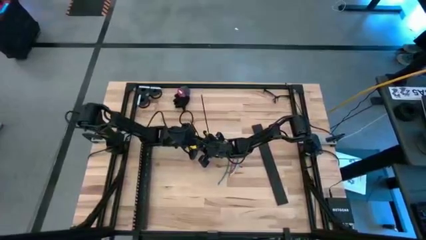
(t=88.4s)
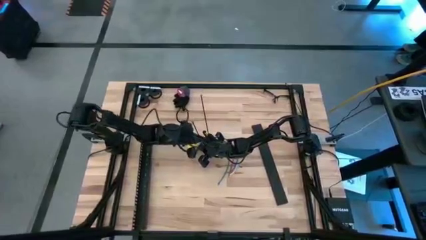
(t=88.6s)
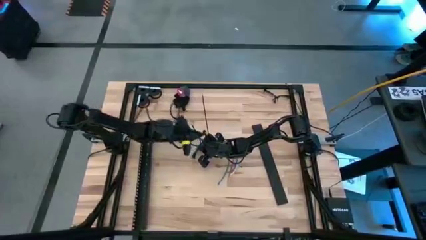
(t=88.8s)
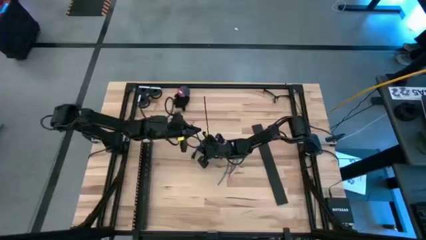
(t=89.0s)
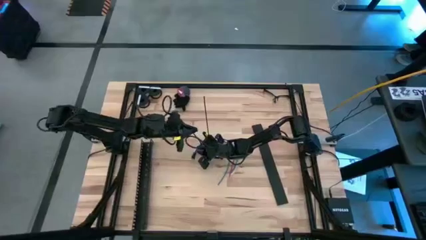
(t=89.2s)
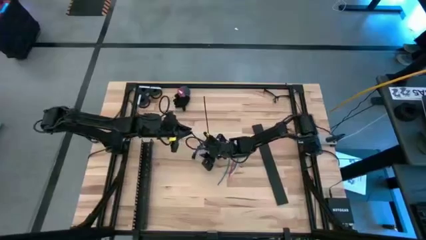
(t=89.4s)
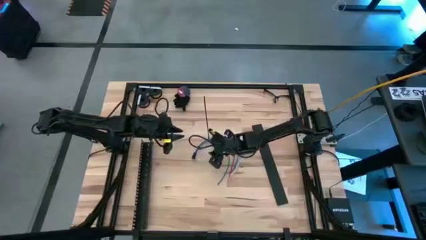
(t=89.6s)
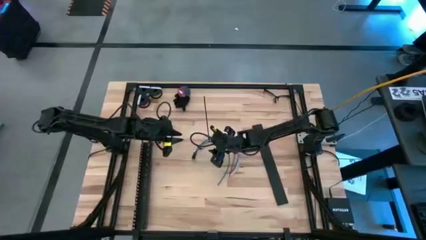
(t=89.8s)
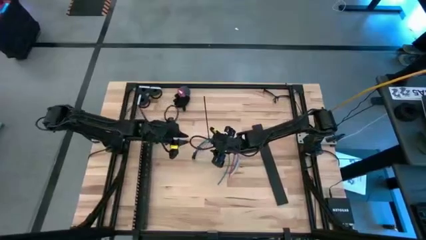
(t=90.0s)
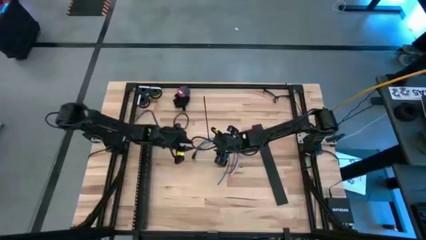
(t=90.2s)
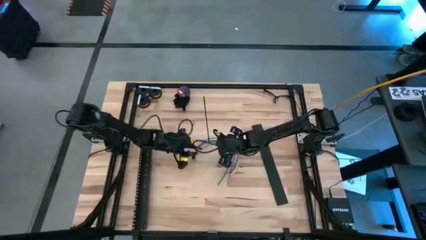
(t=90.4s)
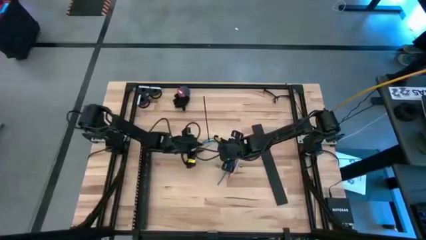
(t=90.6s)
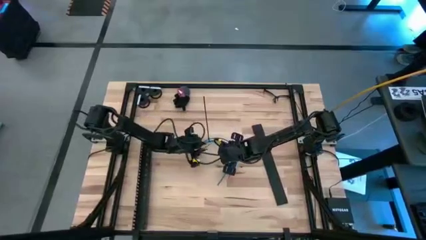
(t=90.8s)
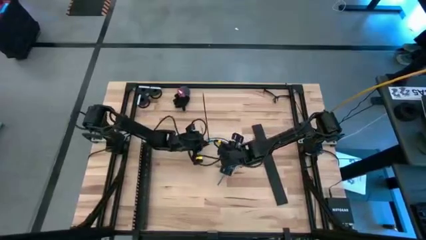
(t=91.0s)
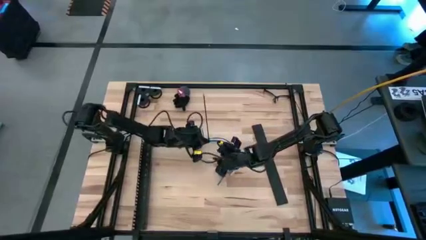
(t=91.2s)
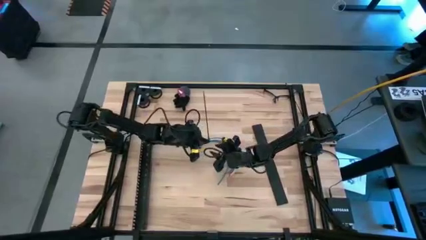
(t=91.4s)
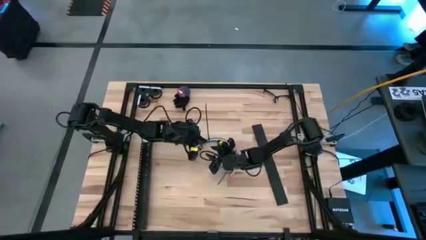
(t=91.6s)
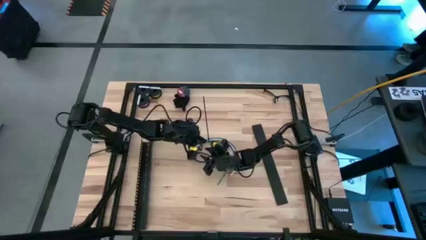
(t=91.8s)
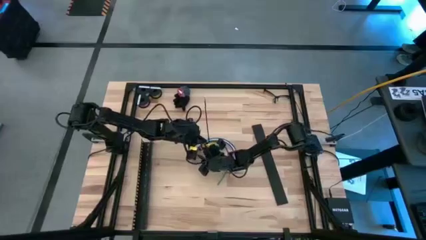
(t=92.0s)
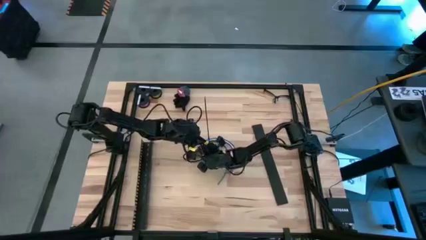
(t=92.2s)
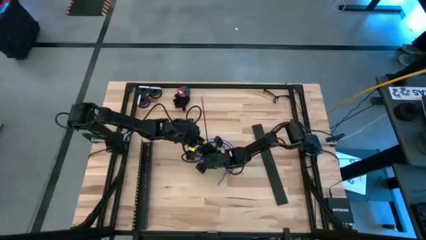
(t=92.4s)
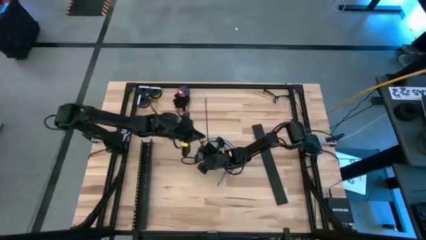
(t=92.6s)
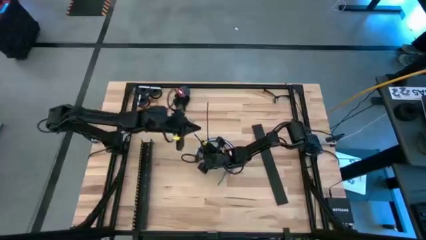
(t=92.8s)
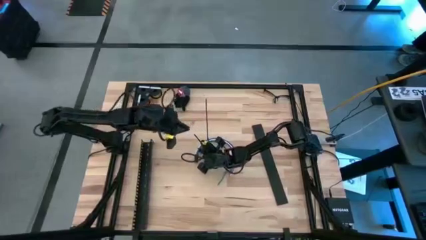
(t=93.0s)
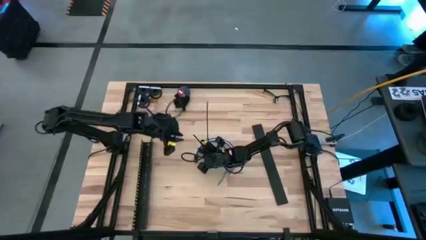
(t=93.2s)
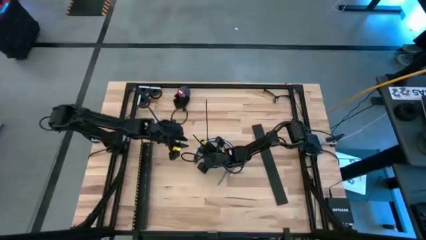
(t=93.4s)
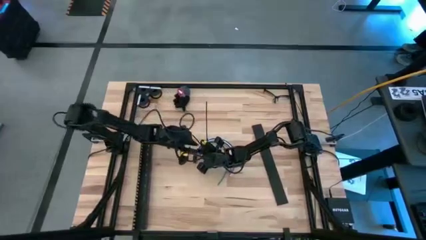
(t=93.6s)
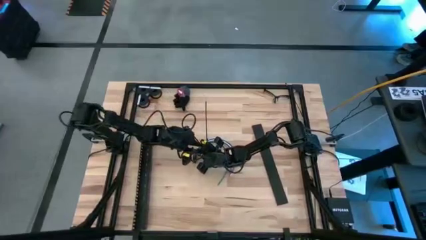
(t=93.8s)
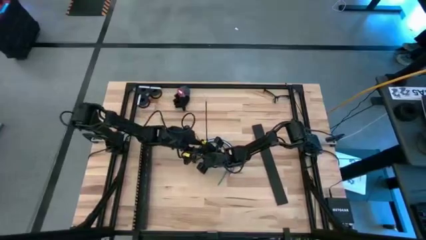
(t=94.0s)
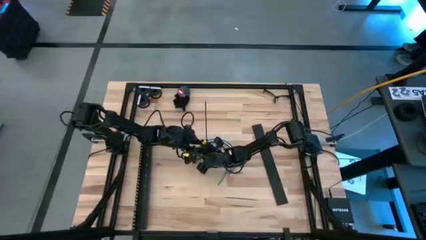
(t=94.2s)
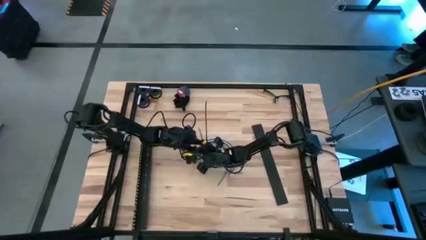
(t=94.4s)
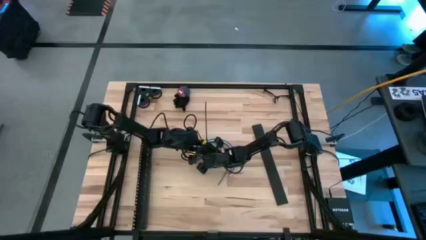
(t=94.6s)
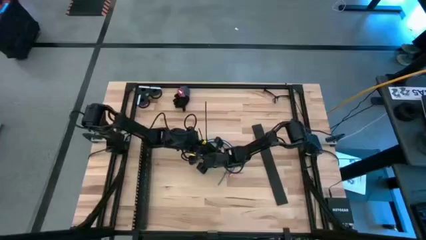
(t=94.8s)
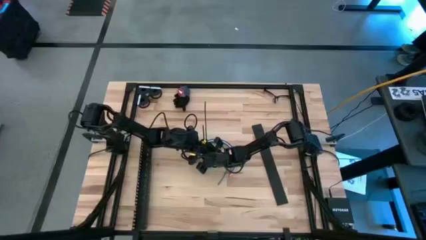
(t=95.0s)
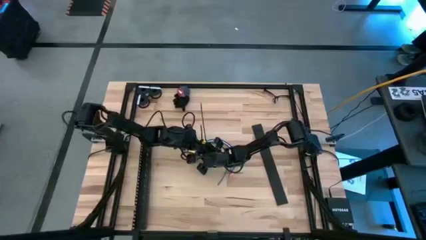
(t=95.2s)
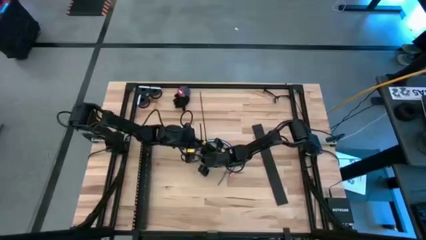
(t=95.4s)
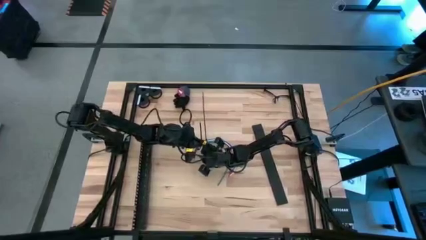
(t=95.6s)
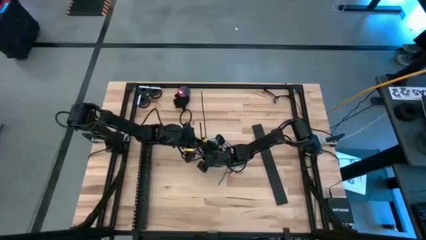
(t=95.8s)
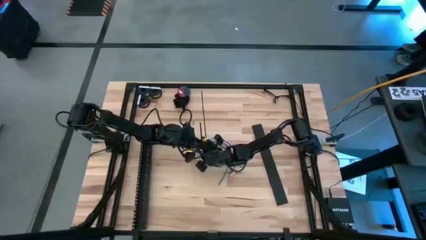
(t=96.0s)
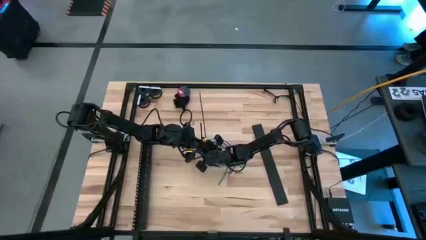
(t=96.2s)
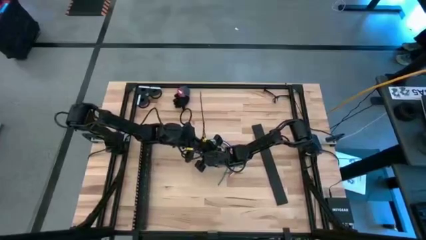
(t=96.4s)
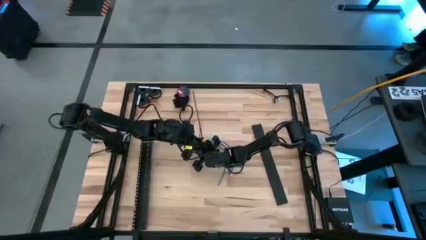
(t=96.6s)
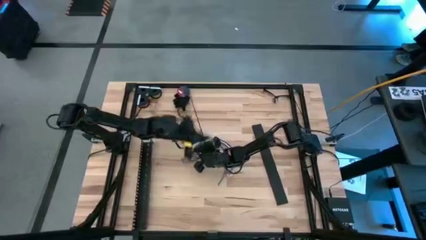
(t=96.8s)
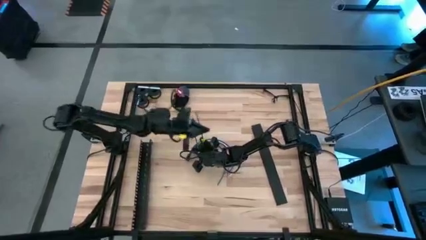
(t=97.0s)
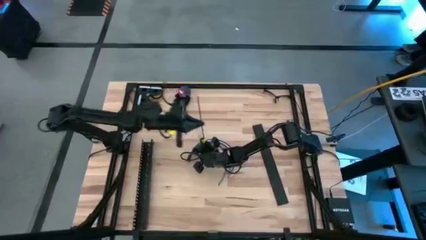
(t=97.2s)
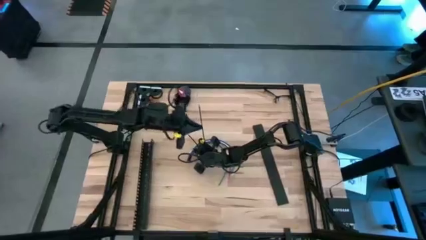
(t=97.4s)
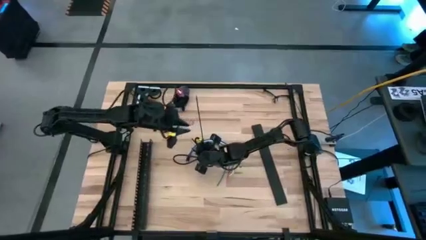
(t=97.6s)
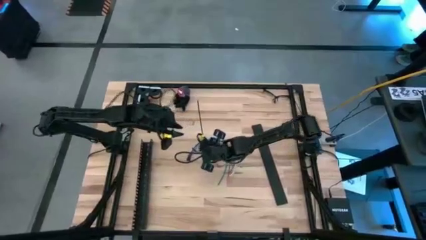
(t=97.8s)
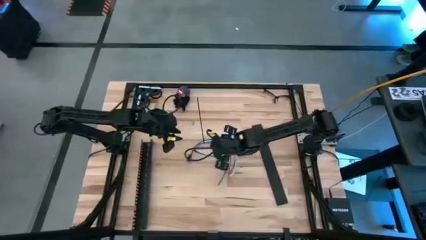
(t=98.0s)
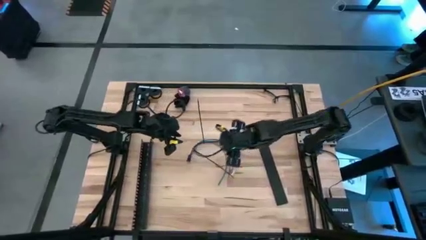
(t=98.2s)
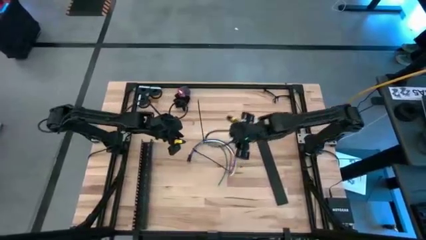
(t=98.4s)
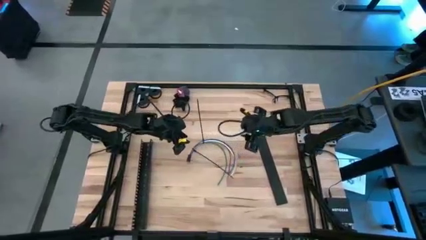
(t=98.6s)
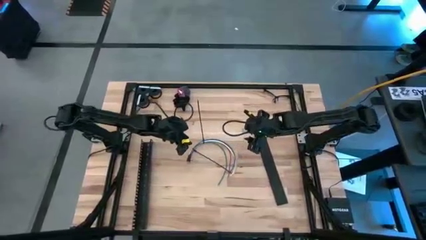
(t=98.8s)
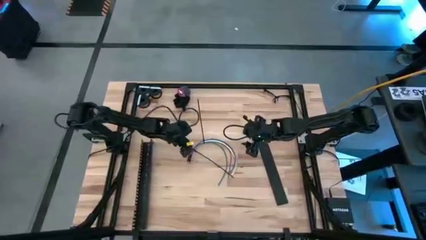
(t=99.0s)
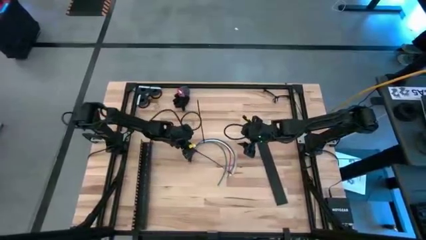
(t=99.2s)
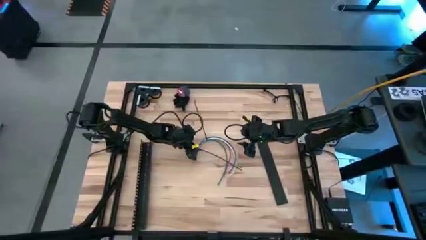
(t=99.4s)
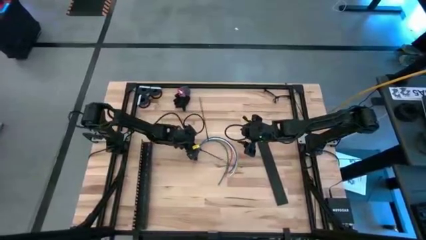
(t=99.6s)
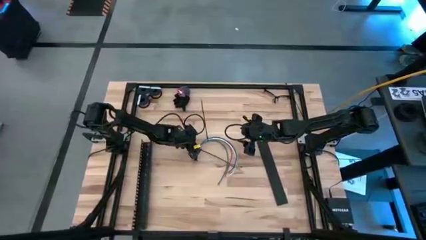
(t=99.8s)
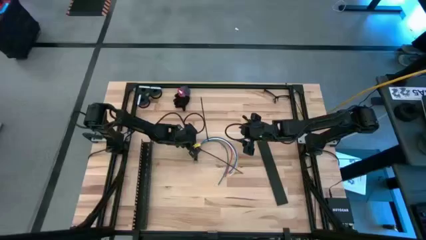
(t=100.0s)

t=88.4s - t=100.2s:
Task: Ziptie cables
Wrap the black zip tie loop on the cables
